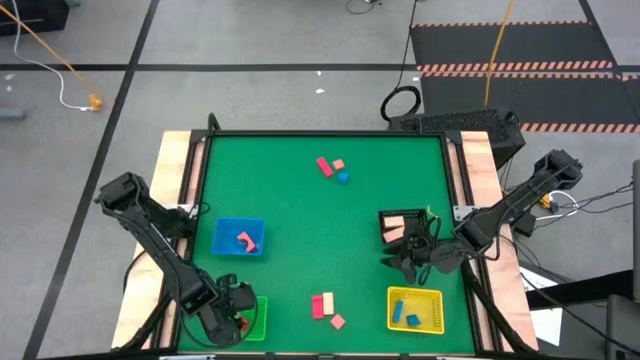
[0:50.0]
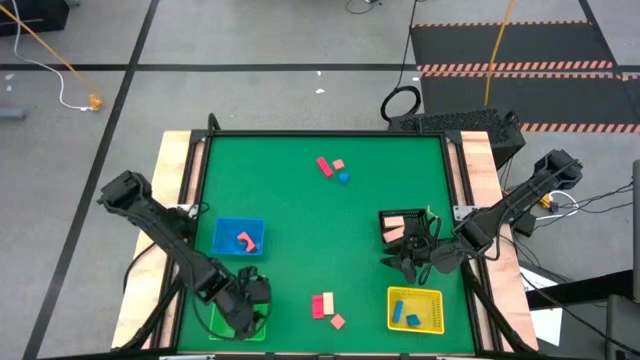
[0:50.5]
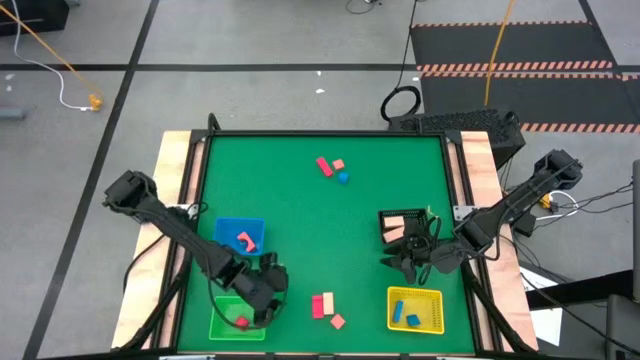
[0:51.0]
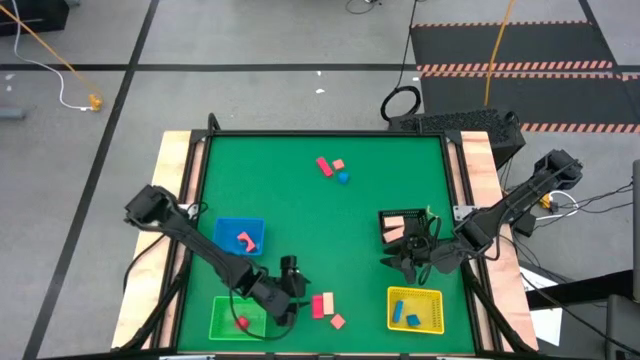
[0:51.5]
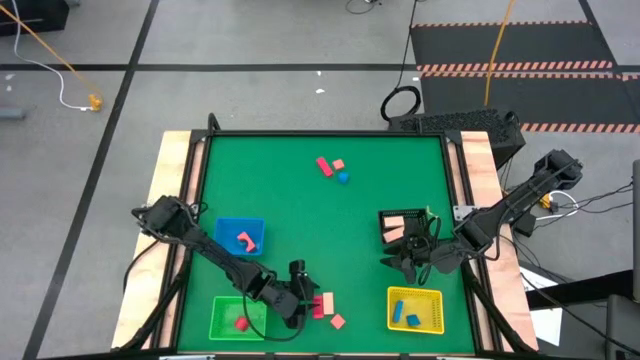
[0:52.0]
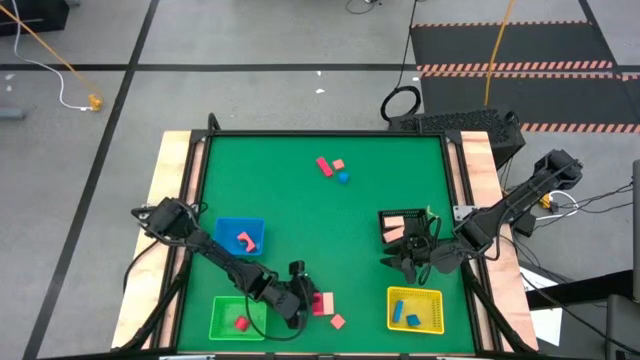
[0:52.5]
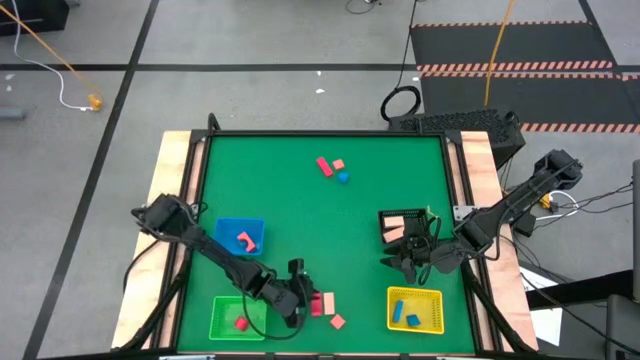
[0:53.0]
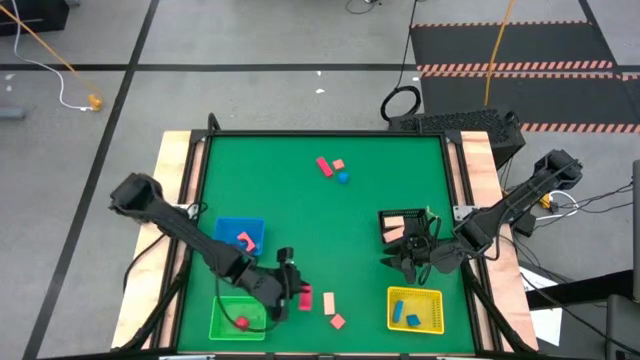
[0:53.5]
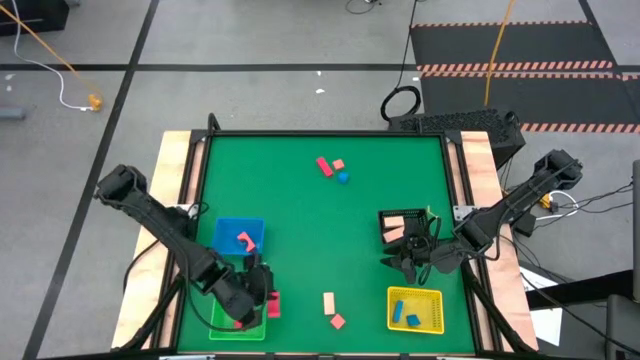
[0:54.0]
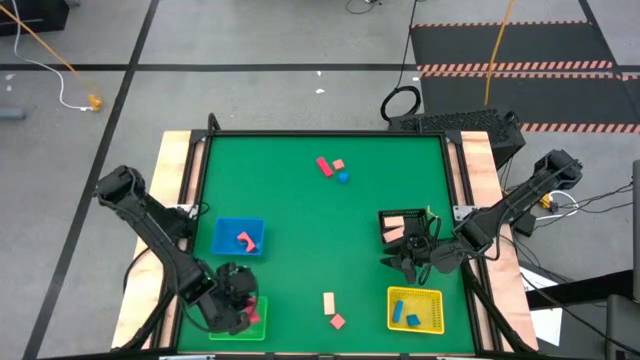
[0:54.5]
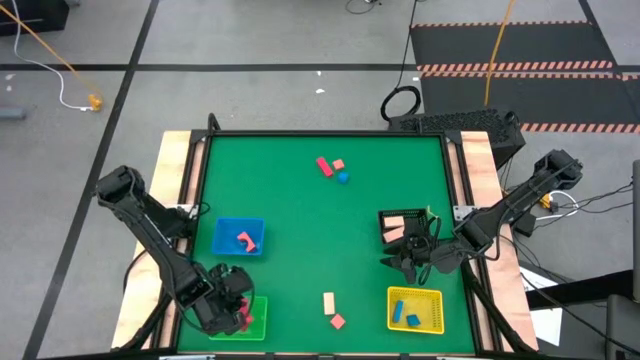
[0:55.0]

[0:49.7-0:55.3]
Task: Sort & place blocks by color
Put the bottom red block into the green bin

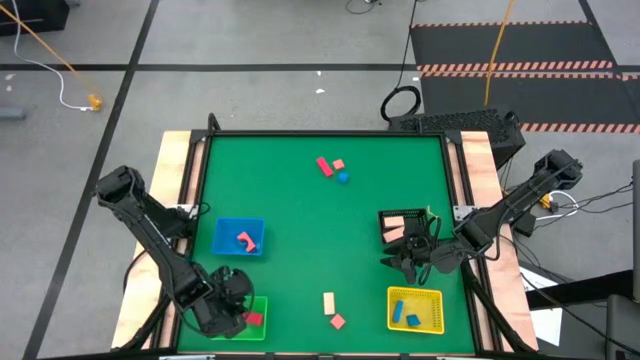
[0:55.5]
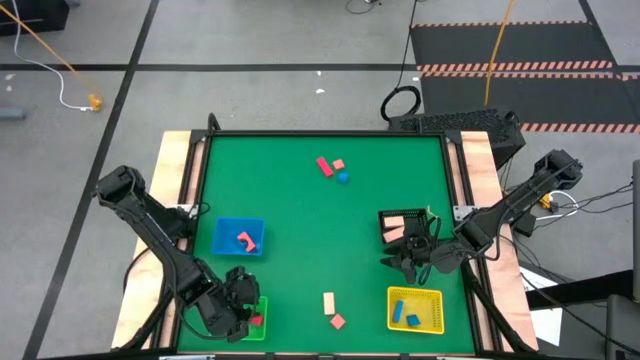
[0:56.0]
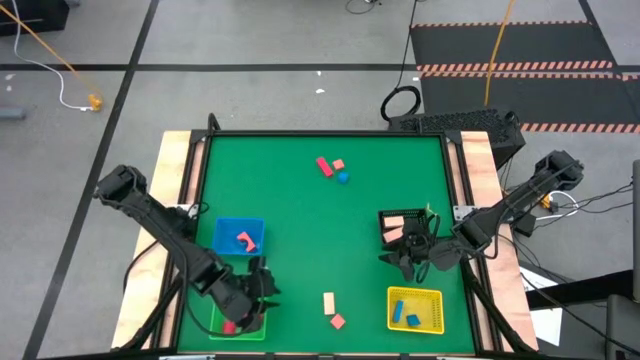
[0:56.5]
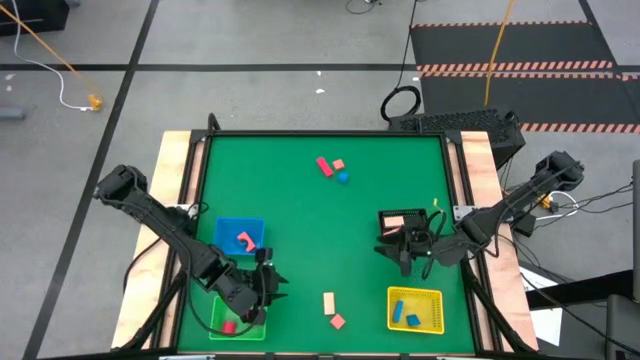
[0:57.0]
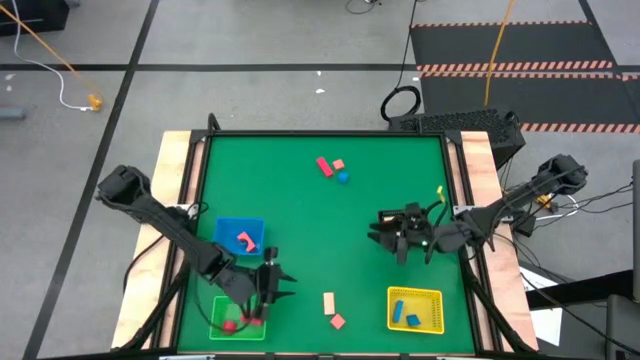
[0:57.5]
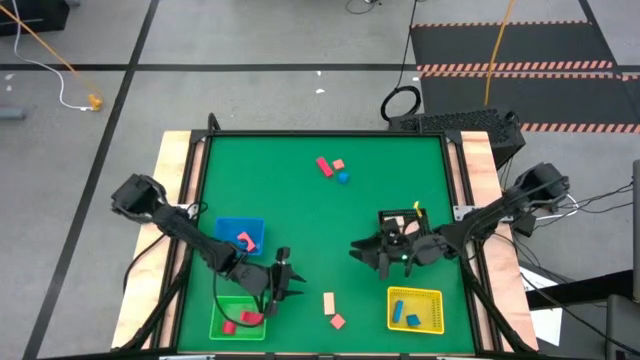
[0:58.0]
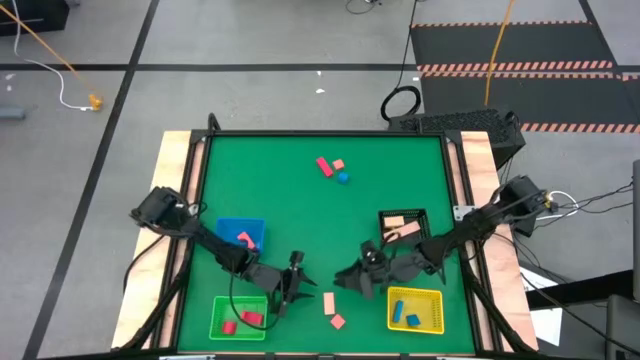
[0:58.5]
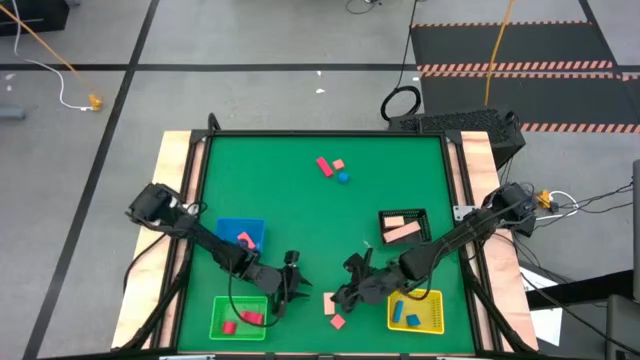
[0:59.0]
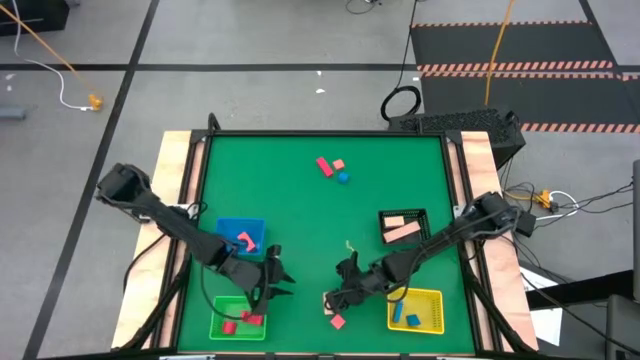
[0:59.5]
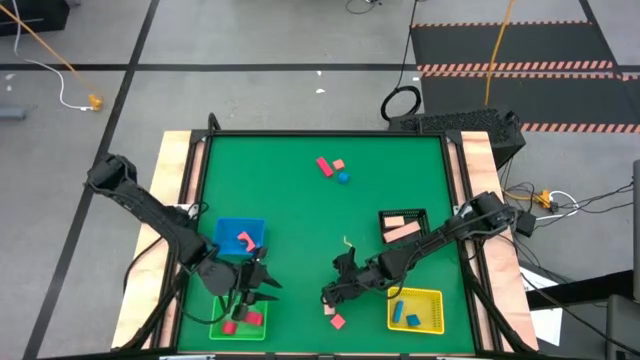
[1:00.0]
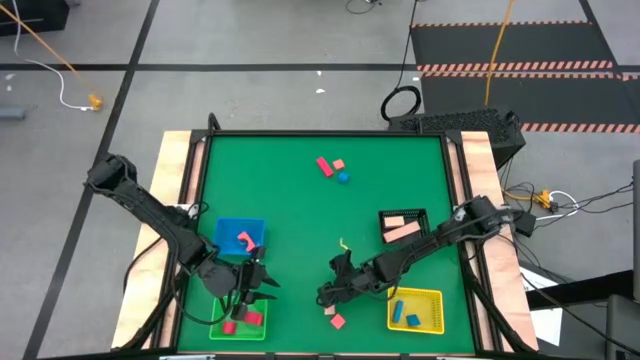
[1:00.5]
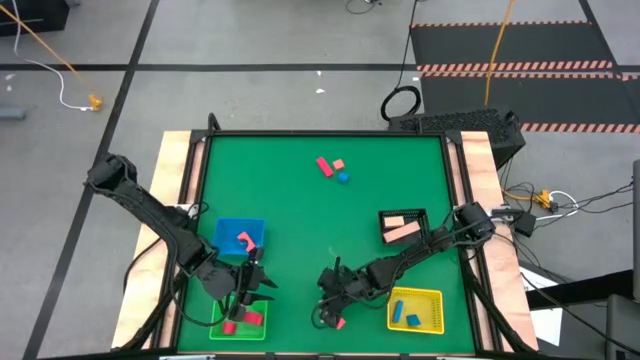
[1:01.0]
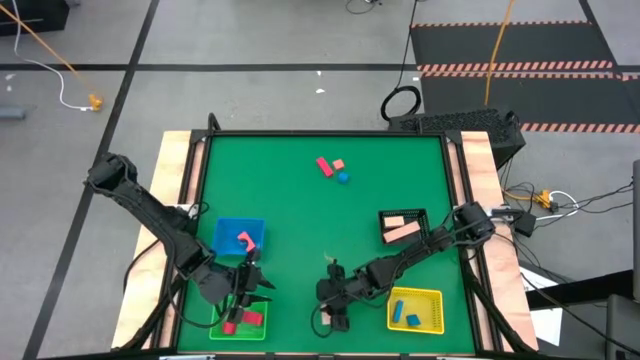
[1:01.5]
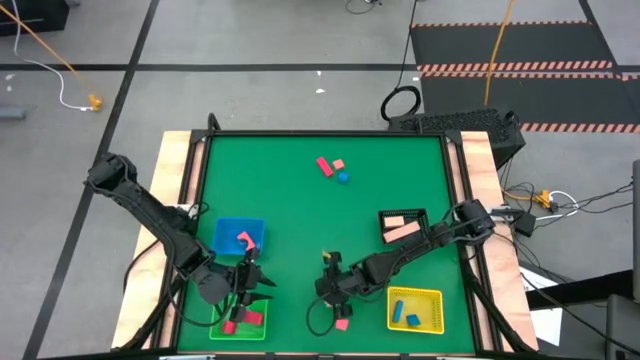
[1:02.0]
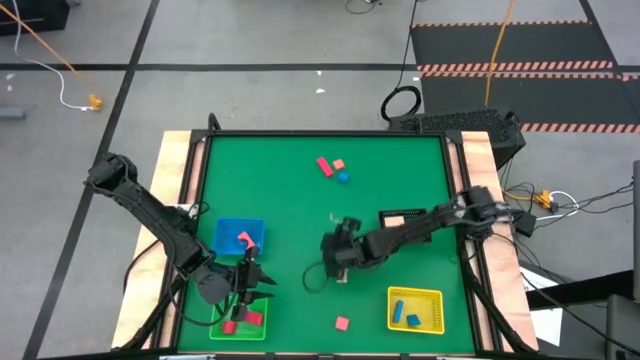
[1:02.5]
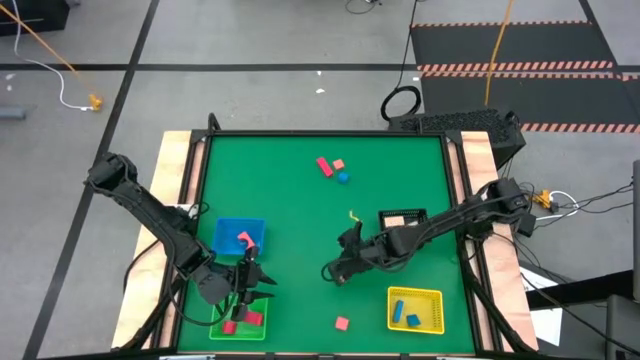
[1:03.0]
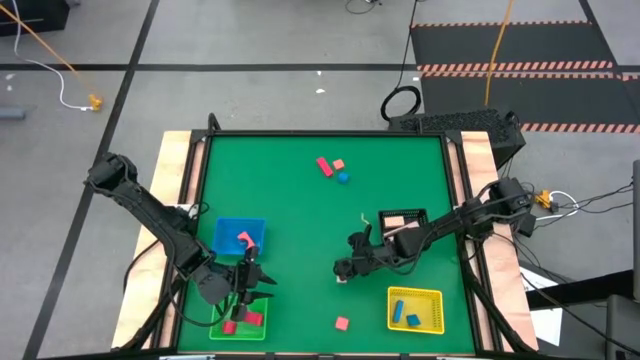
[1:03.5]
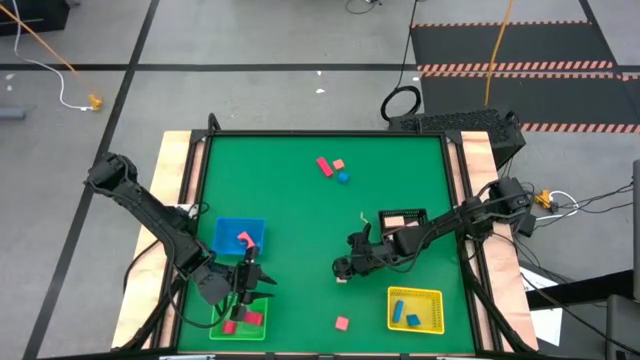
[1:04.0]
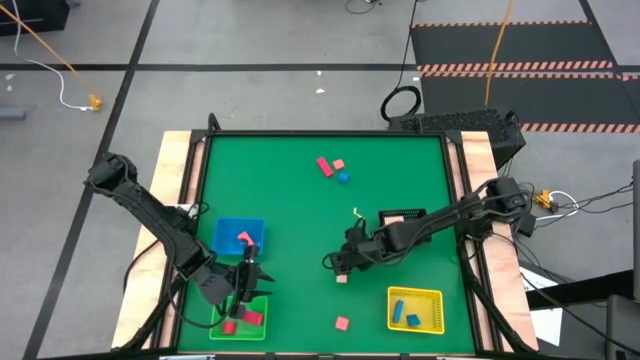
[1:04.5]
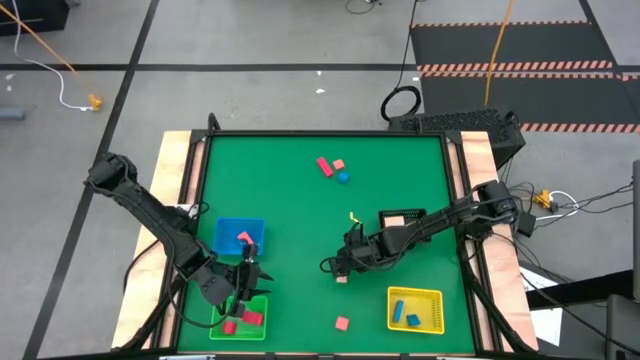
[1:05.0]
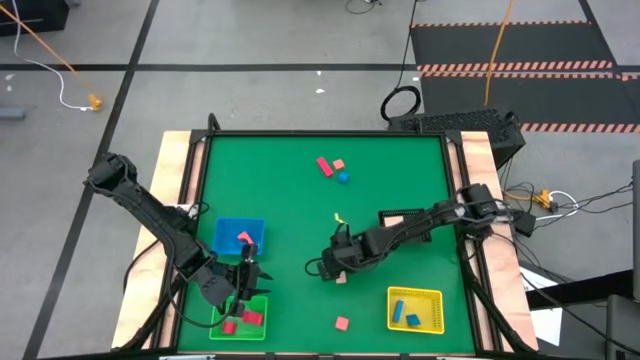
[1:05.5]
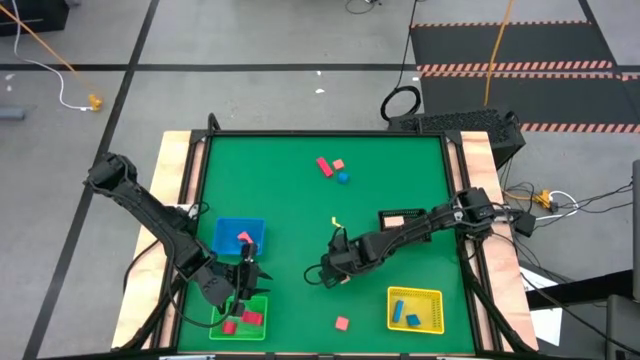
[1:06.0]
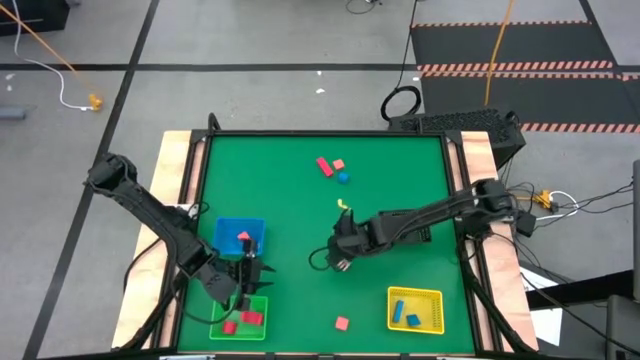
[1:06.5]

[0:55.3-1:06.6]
Put the white block into the black bin

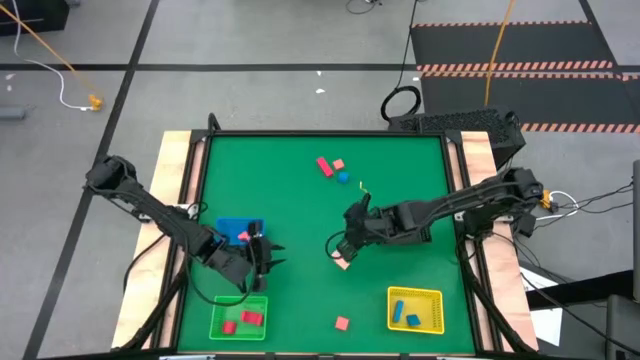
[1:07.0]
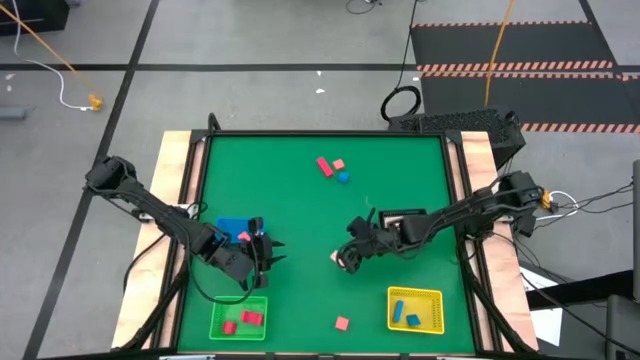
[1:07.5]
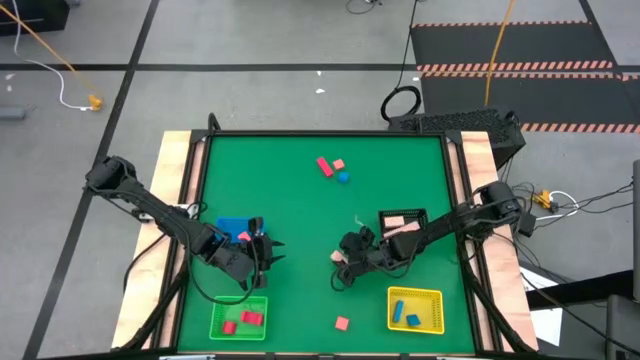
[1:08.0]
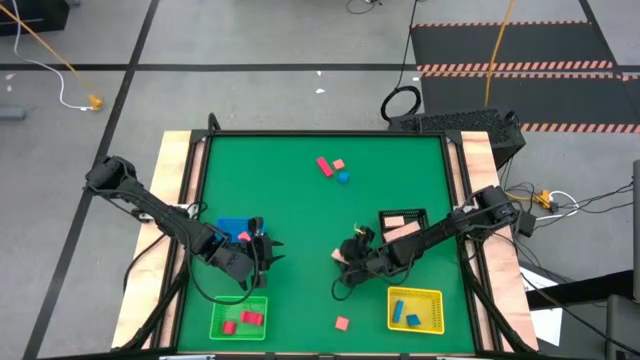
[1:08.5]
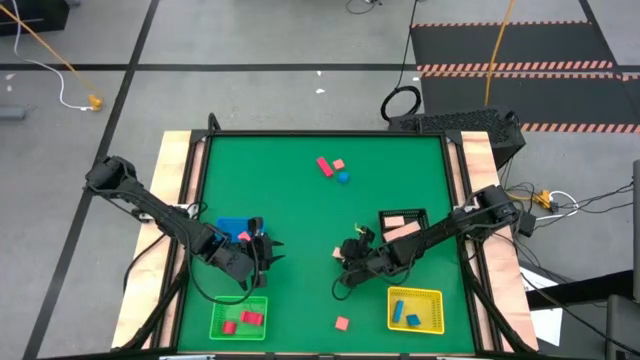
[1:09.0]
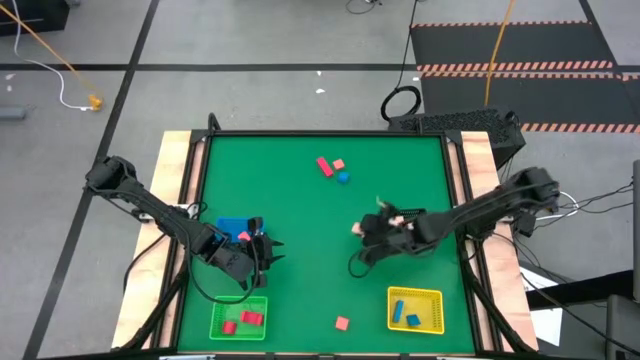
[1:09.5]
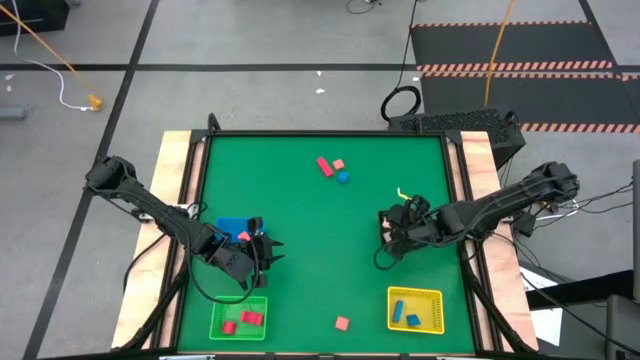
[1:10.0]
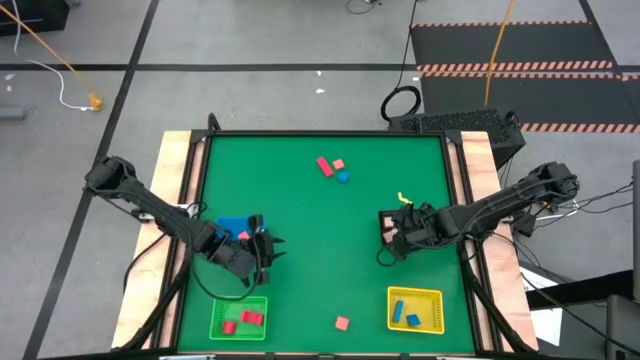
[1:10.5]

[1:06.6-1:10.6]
Put the white block into the black bin
